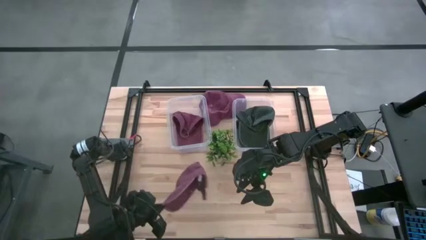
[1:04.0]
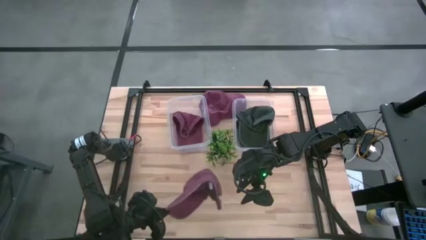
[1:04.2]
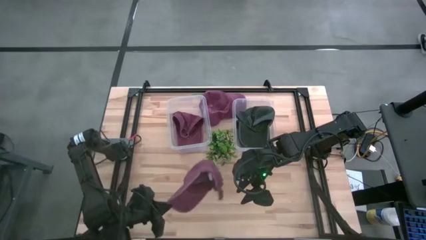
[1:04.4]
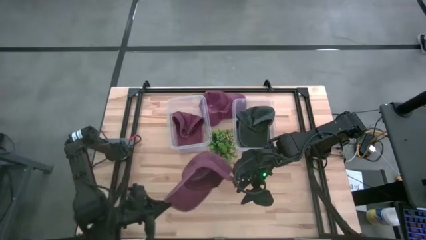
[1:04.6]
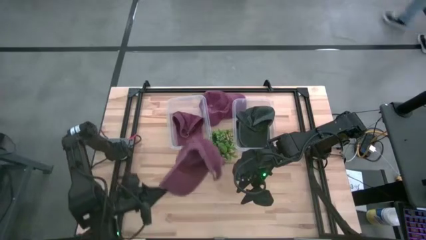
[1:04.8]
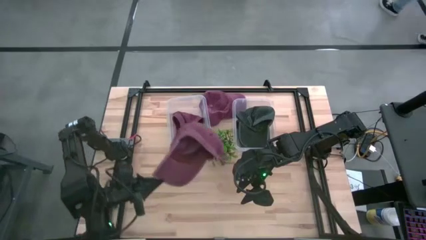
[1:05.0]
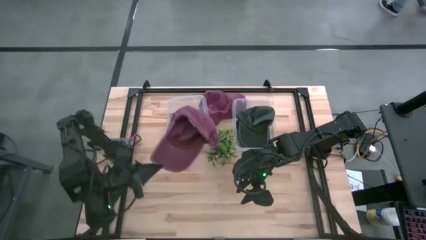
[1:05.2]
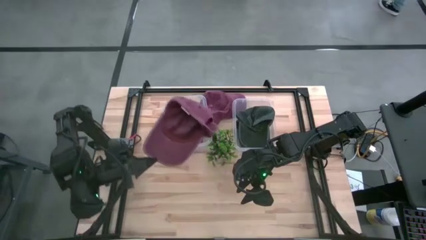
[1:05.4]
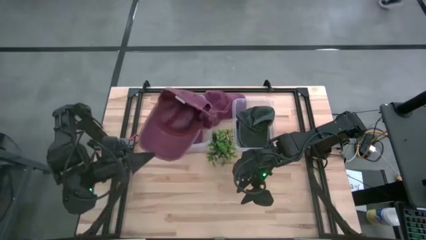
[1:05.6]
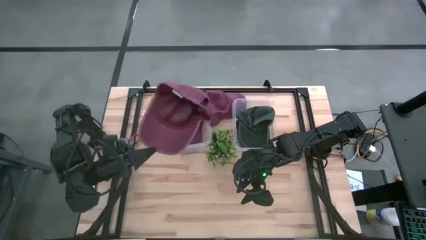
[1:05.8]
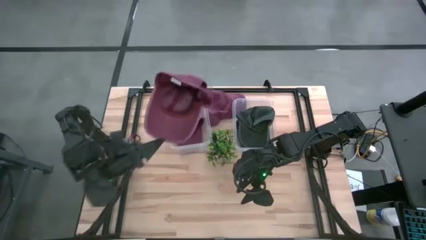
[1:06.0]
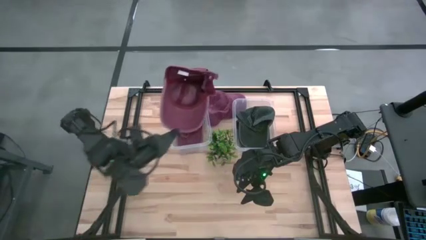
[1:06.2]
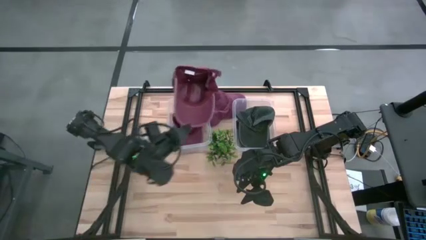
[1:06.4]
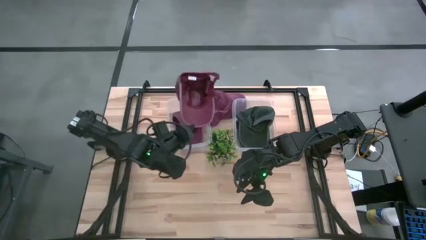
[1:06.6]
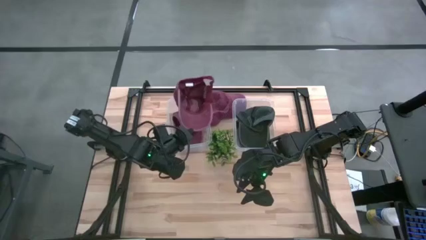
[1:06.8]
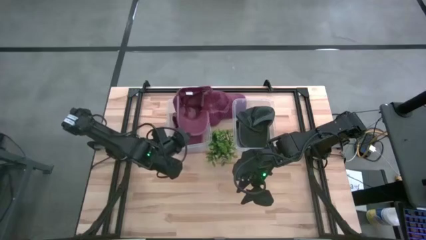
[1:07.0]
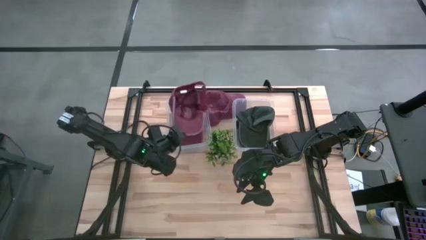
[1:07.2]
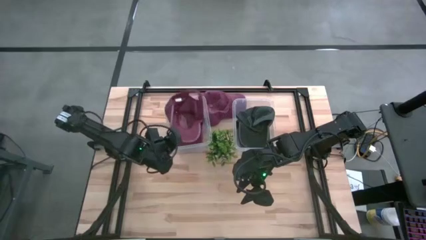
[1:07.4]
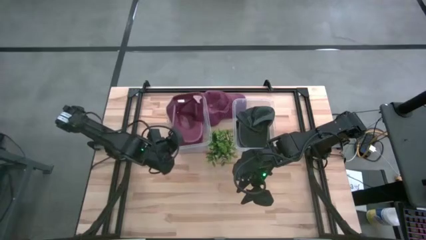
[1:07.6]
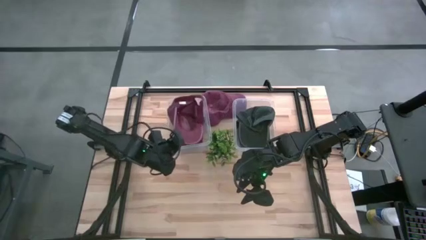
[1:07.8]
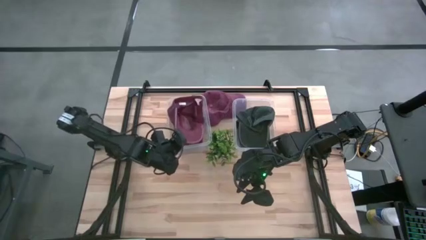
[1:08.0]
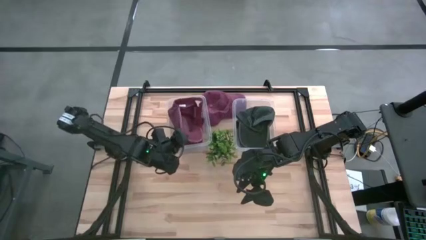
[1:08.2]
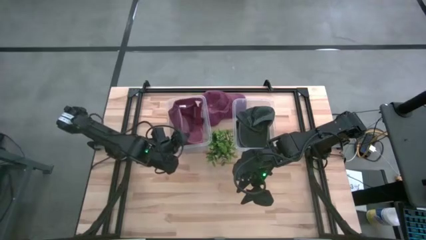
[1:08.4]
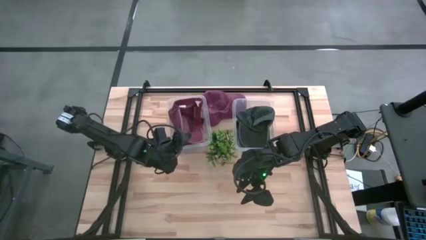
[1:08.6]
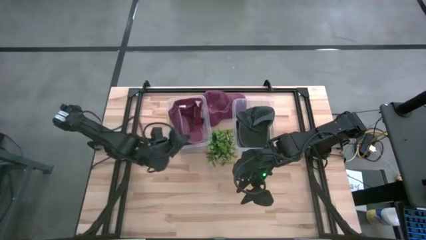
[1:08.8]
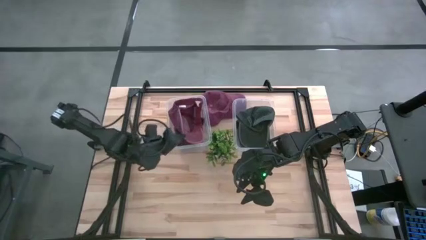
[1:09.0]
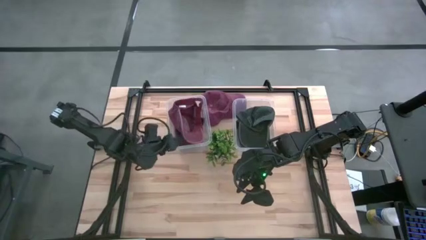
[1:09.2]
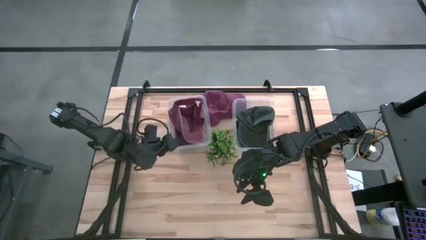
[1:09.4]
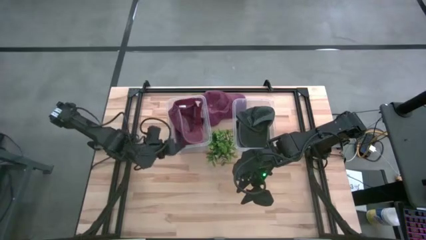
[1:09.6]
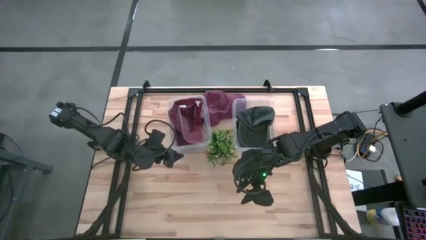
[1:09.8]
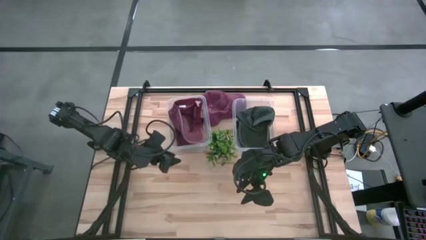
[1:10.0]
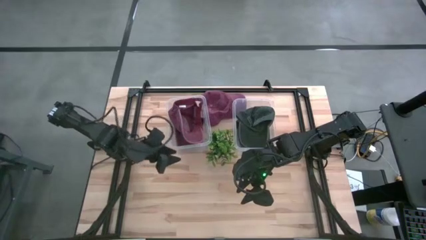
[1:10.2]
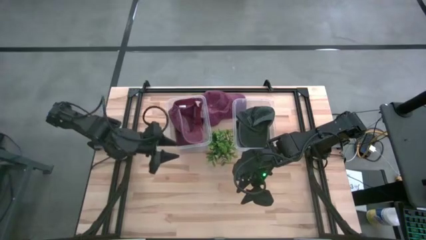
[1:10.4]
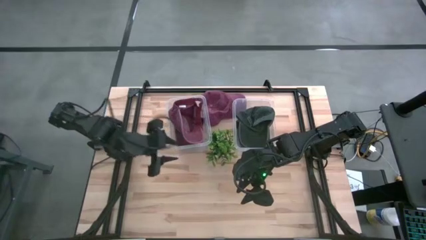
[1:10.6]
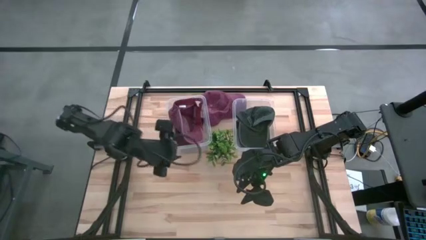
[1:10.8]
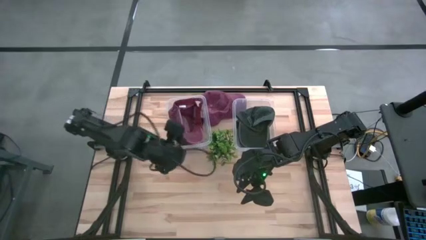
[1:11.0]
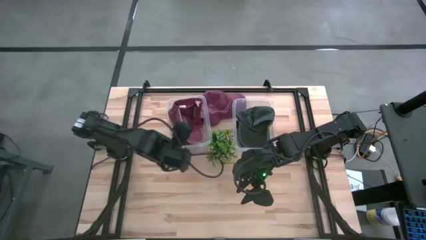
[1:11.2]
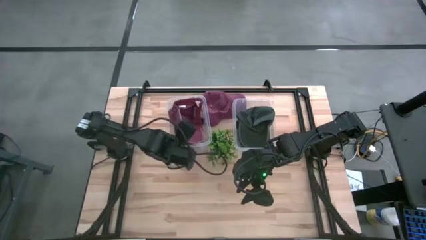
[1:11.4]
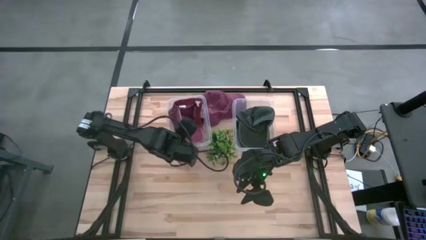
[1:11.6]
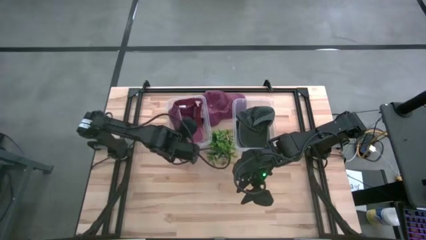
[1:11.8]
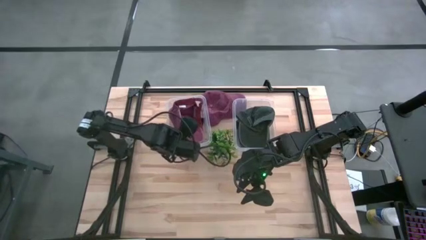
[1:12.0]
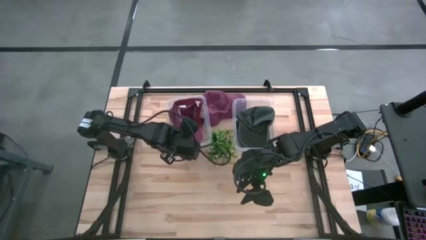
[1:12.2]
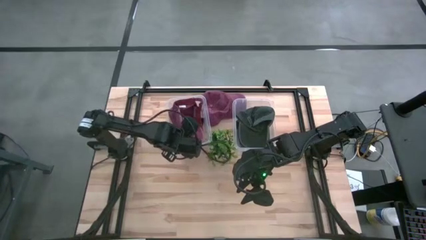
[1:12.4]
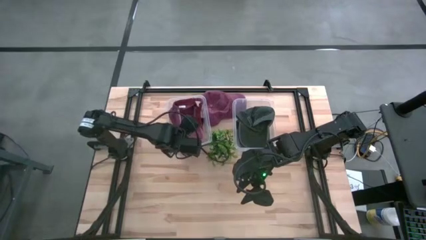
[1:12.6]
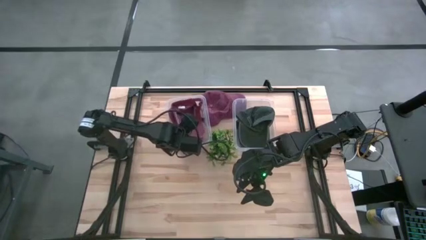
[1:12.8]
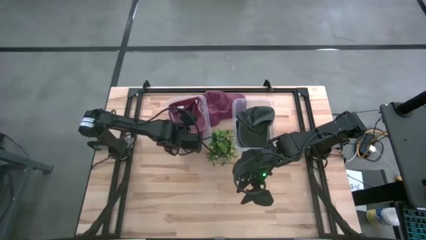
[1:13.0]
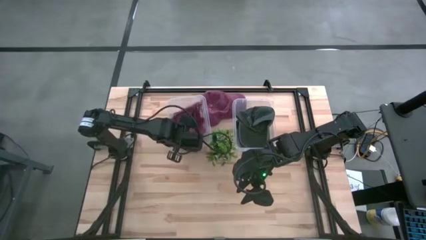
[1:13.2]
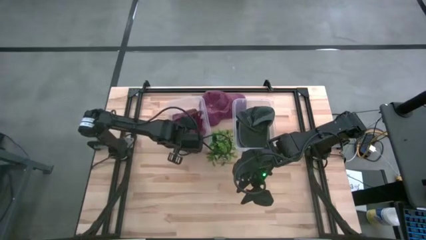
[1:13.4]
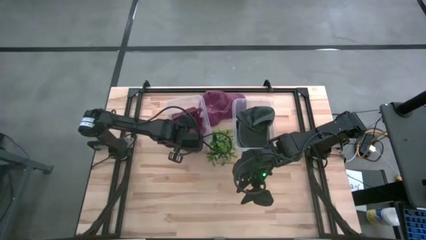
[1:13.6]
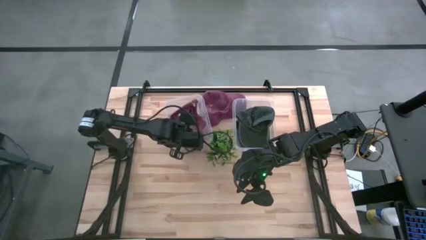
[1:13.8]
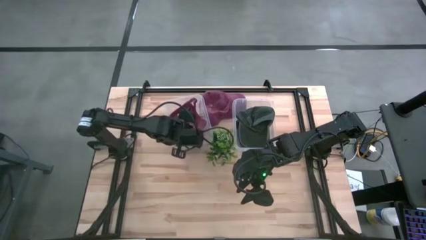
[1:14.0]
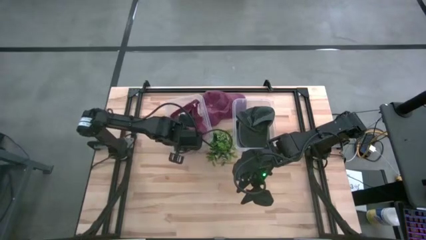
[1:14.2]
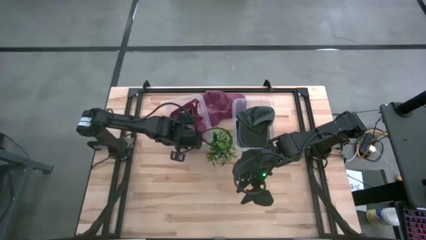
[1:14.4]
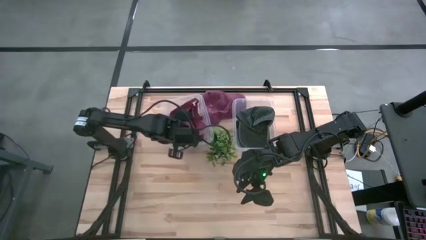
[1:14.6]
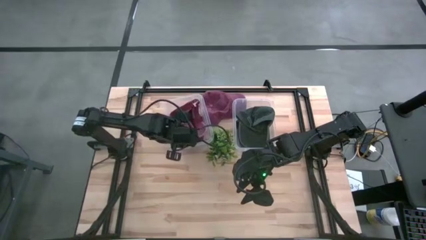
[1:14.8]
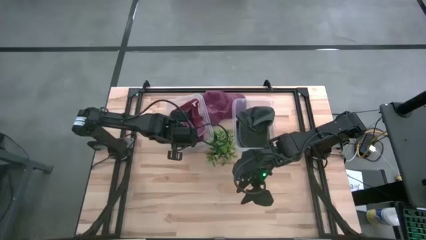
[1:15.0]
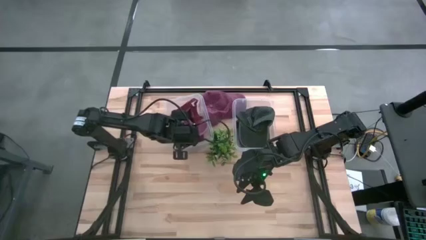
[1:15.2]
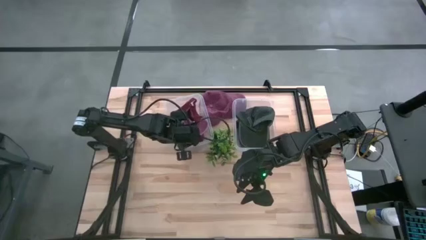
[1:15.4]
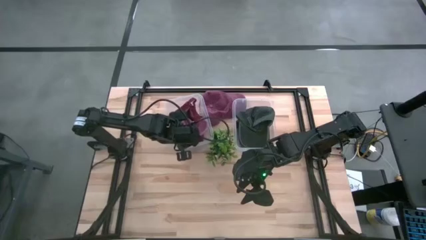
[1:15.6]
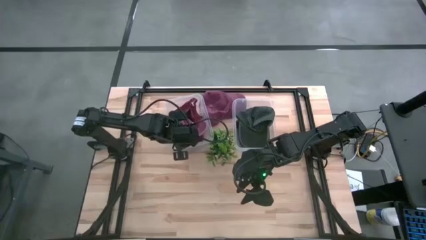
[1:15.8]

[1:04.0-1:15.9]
Task: Pick & Place hat
Put the bottom red cap into the left transparent bin

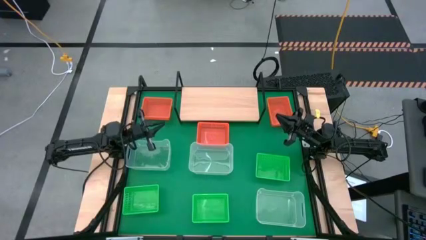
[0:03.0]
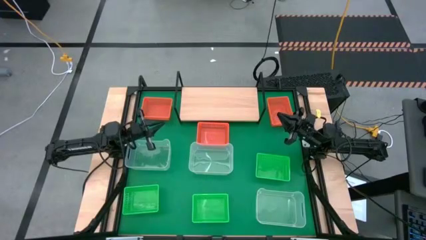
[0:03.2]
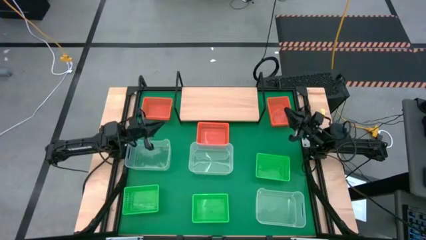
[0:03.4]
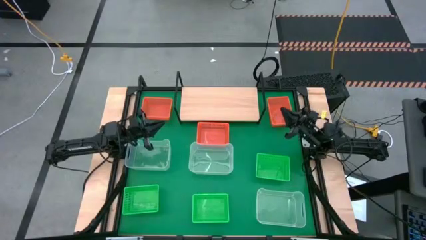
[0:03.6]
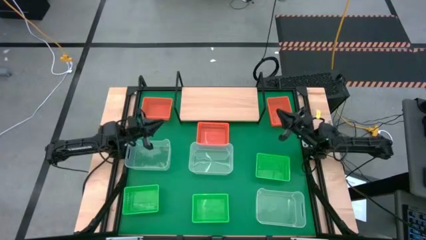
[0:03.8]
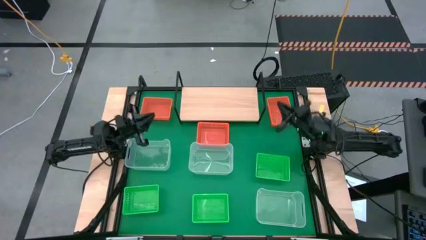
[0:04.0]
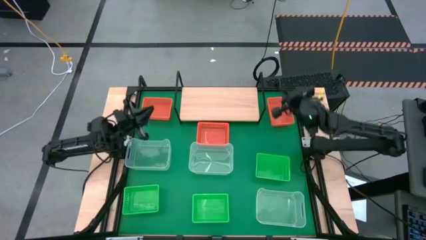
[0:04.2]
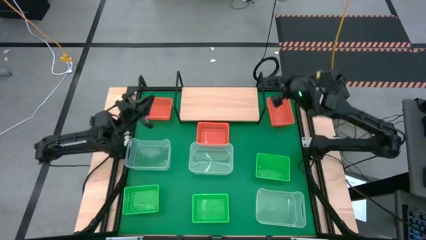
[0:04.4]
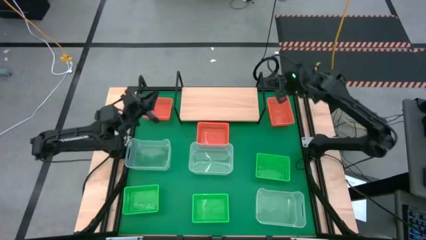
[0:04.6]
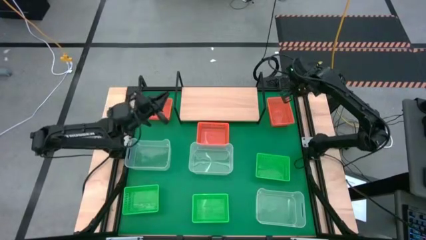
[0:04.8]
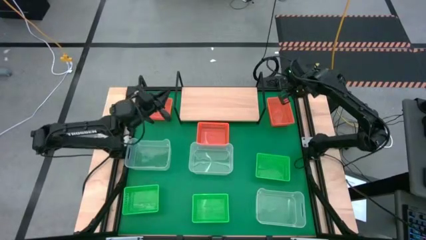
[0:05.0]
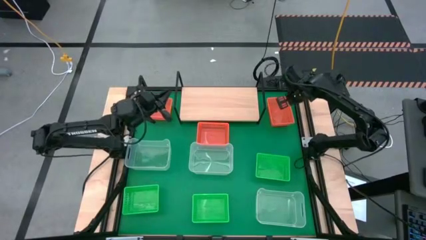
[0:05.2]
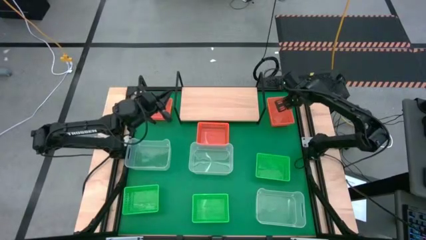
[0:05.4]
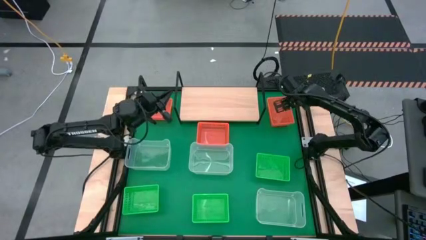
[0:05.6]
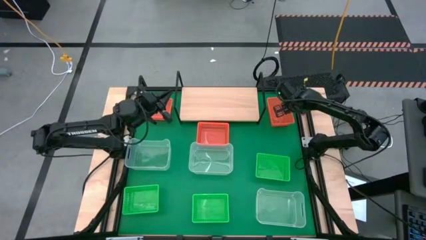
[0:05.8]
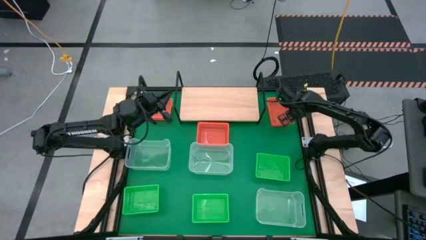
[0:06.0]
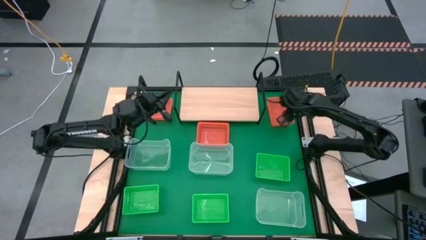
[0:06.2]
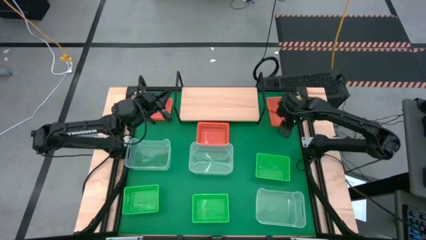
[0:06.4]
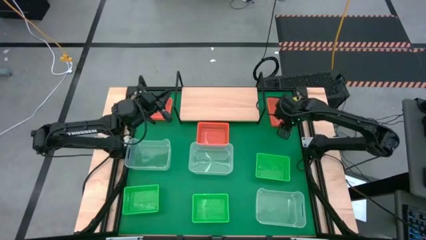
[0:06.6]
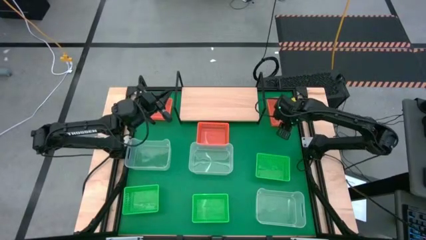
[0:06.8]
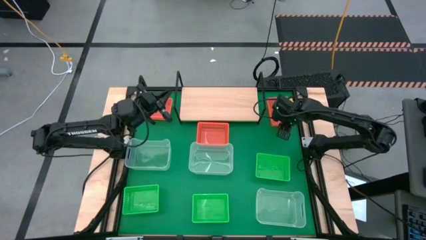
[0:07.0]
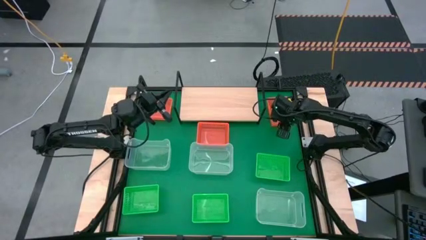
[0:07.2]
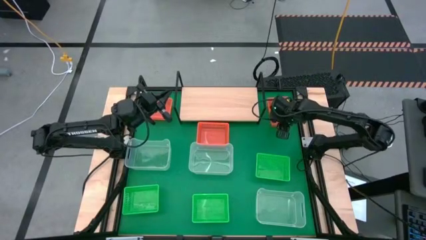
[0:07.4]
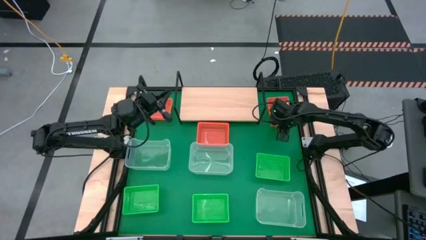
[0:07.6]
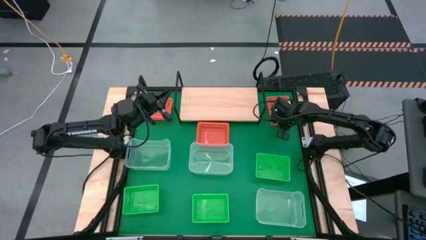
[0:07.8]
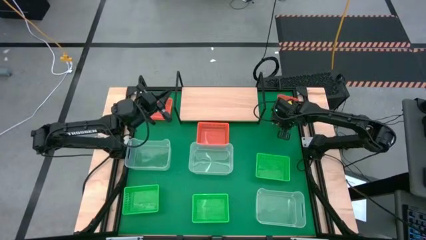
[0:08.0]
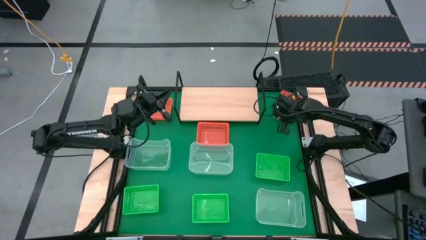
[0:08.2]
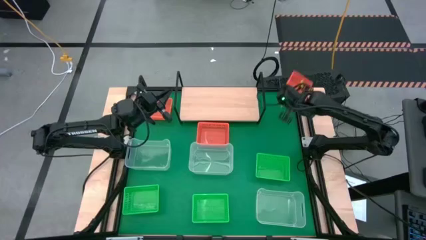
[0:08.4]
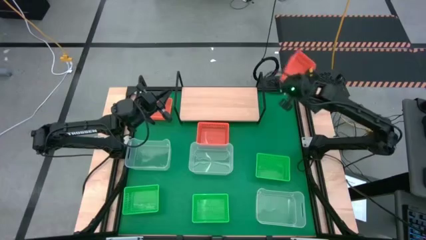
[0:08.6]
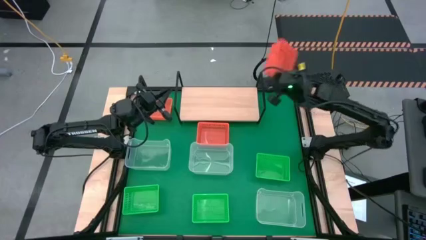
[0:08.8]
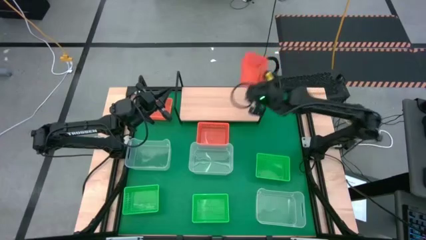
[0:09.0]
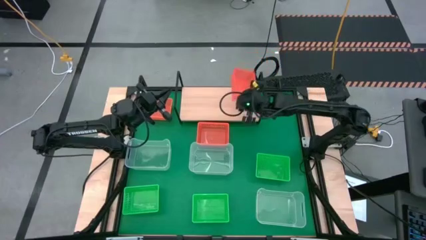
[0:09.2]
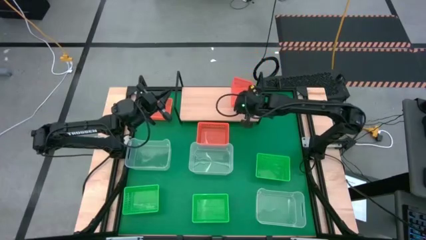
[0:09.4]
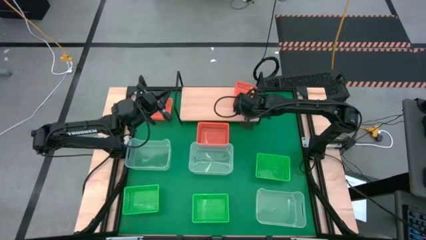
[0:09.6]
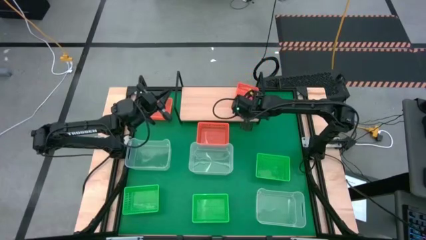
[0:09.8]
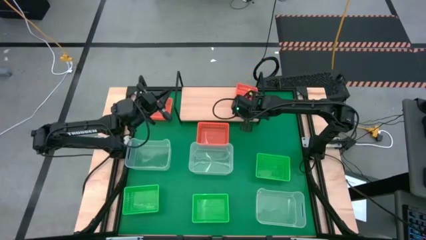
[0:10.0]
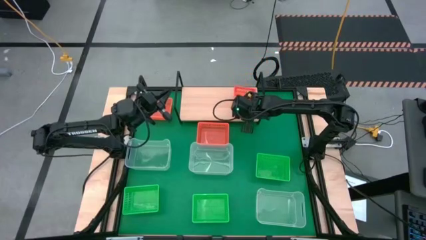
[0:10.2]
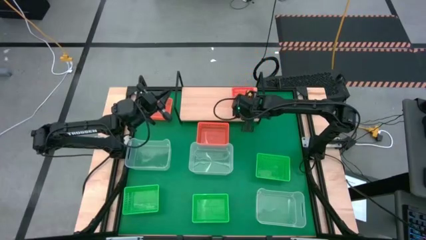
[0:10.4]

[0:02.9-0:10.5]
Task: Stack baskets on shelf by color
Put the top right orange bin on the shelf
